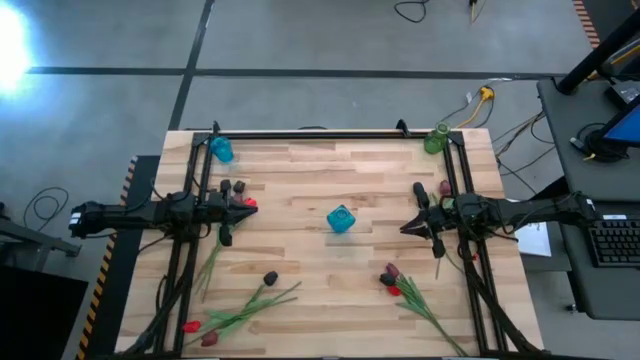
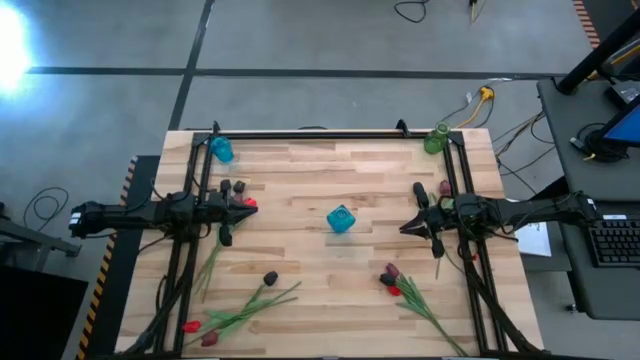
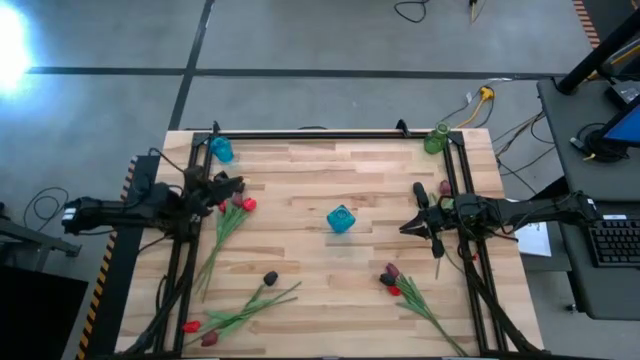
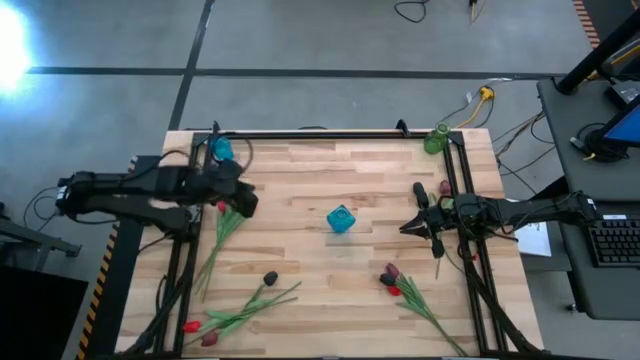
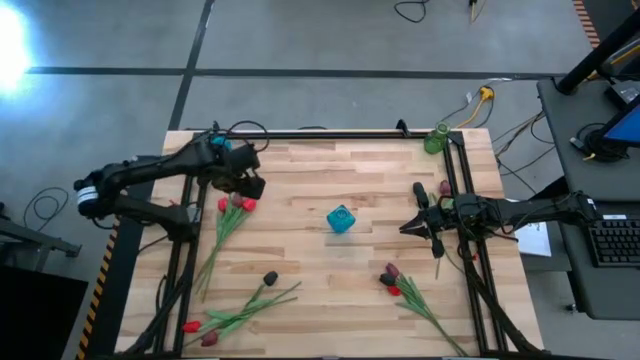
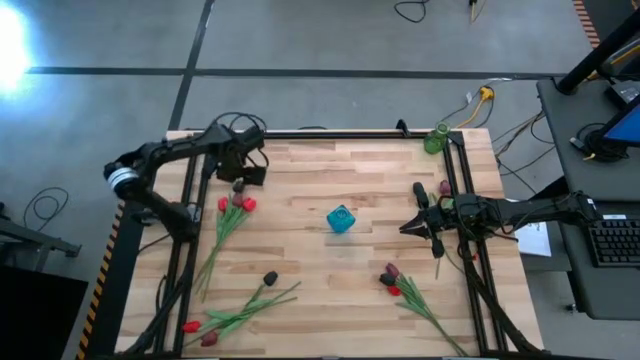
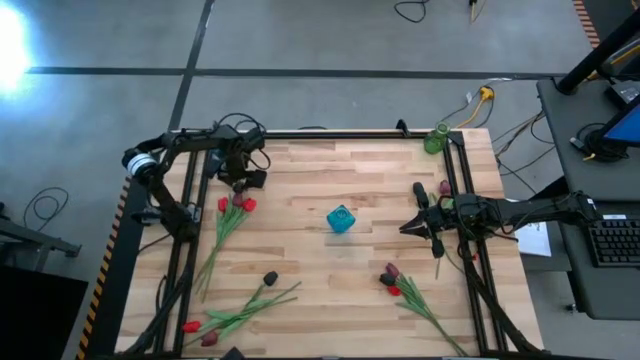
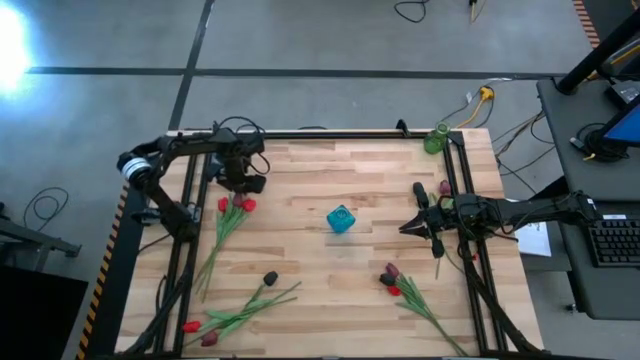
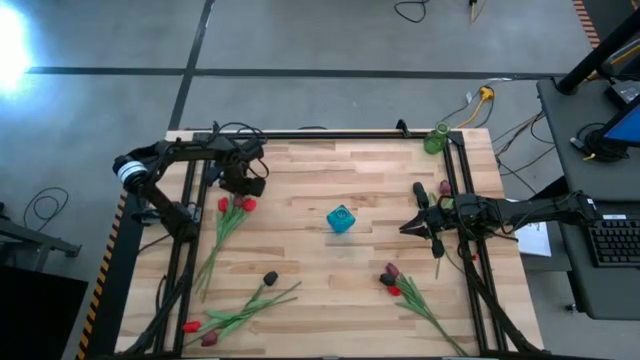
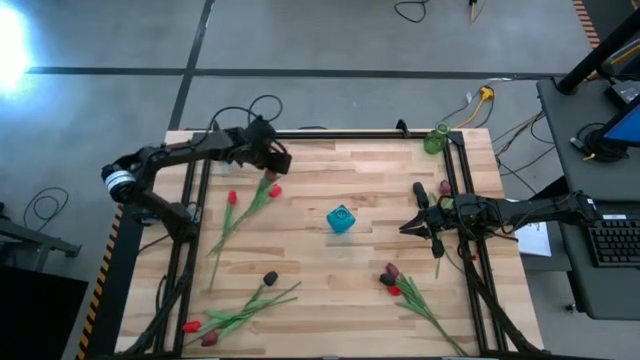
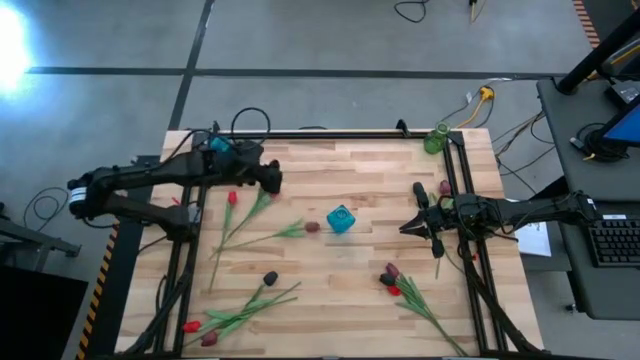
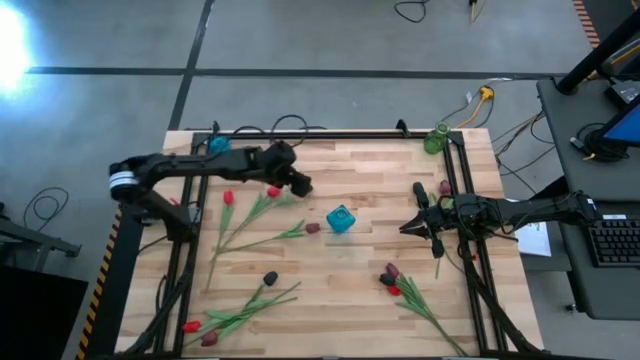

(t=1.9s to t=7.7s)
Task: Sort flowers into vase by color
Put the black flower into the right blue vase

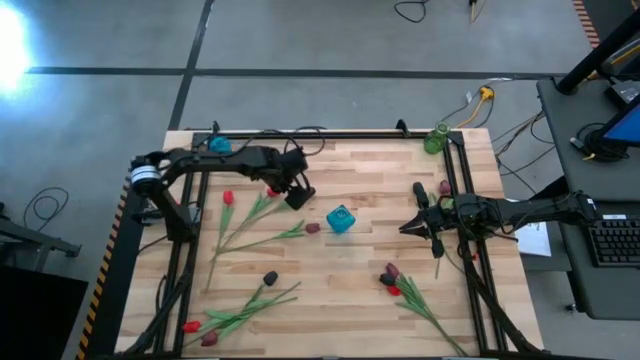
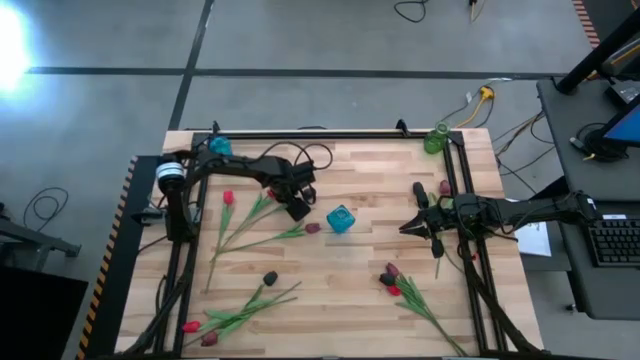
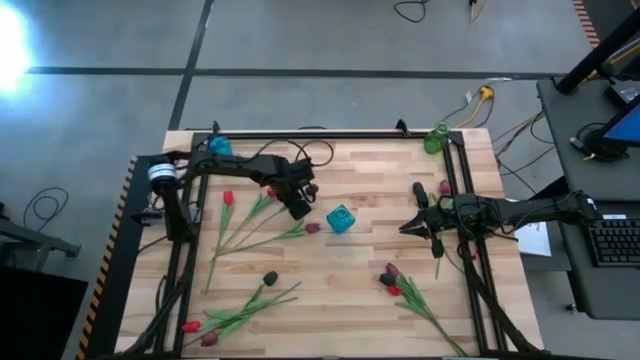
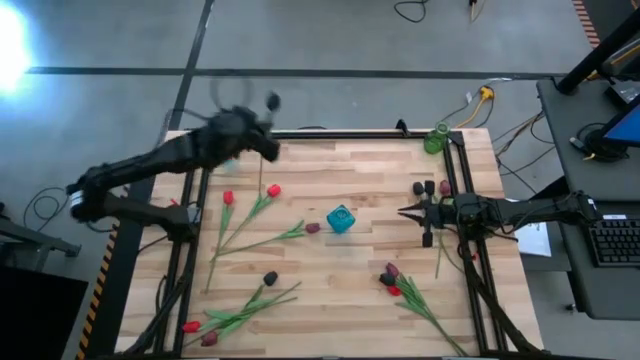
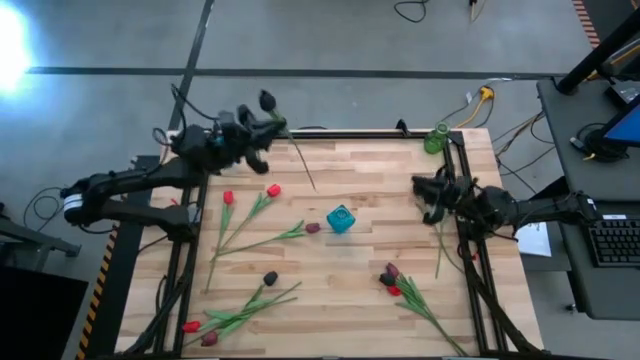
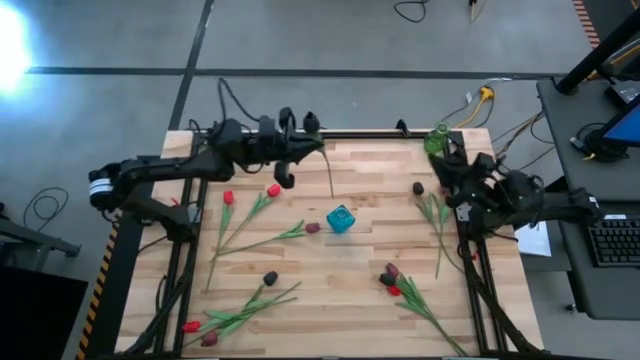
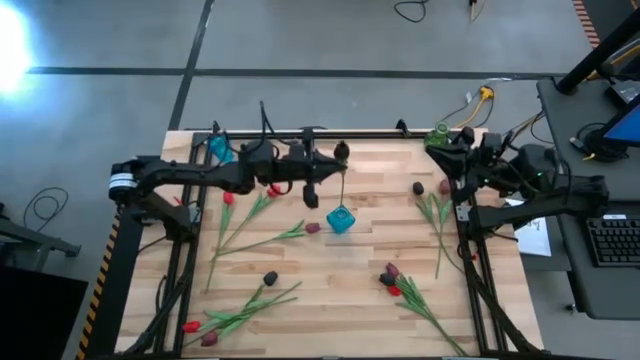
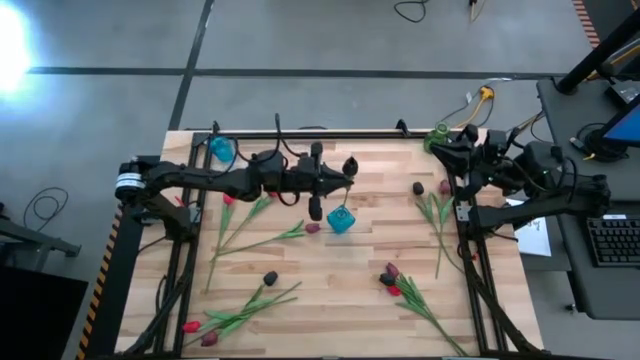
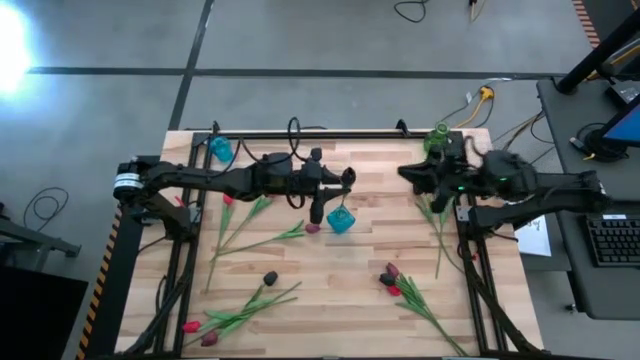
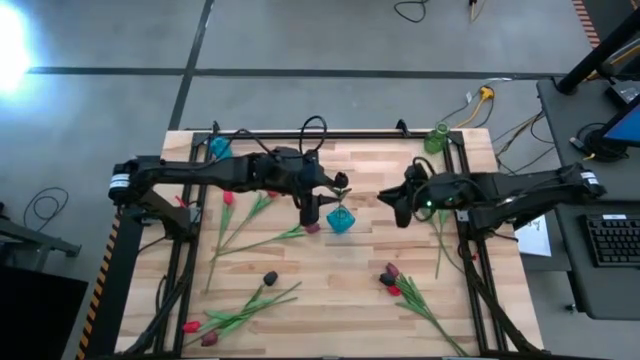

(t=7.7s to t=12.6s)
Put the black flower into the right blue vase

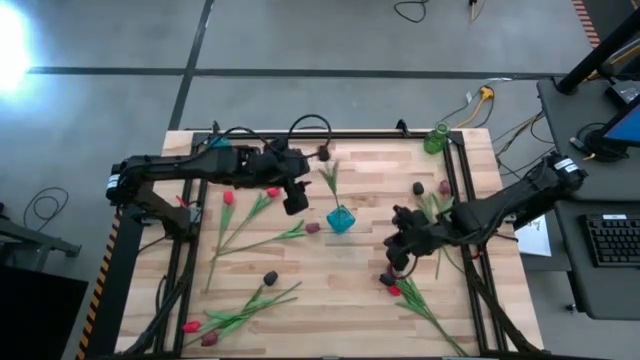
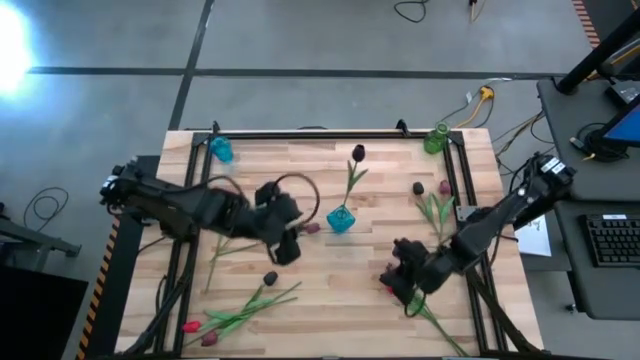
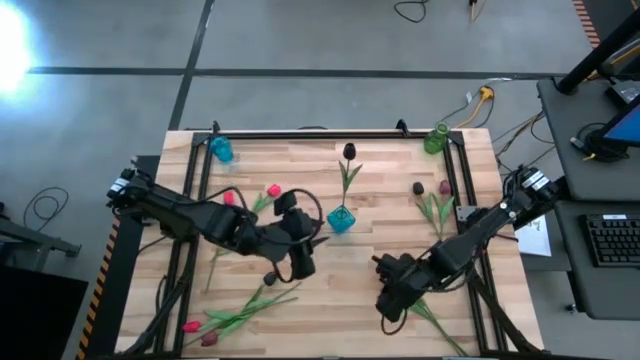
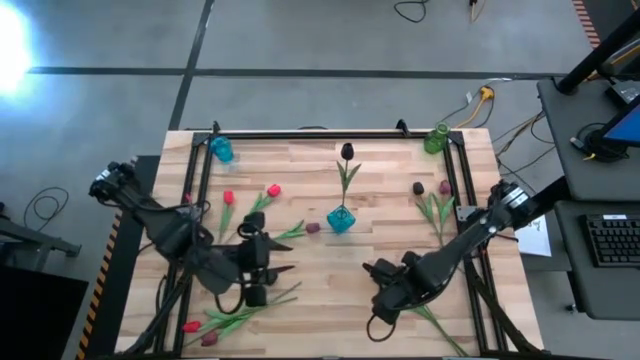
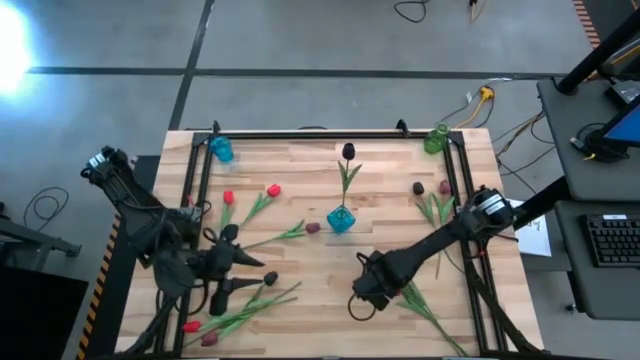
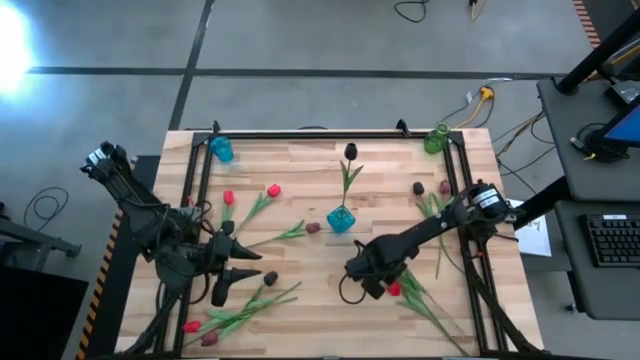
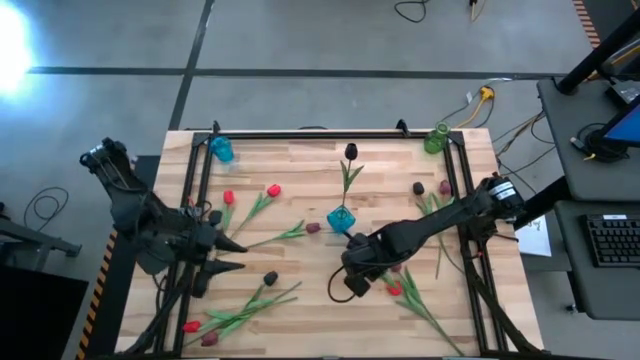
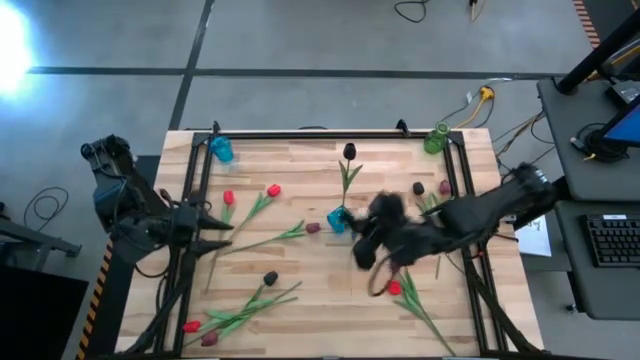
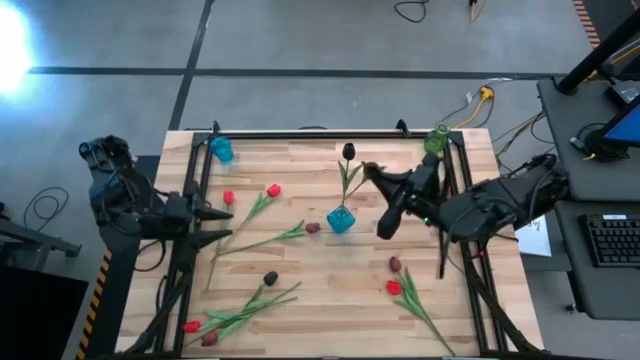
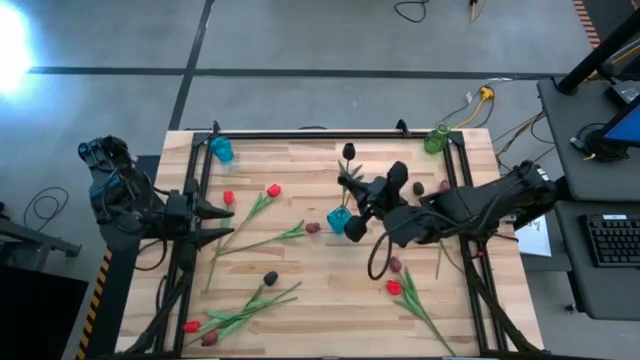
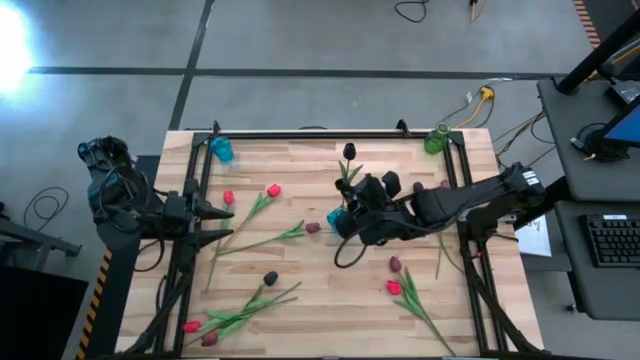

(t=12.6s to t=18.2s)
Put the black flower into the right blue vase

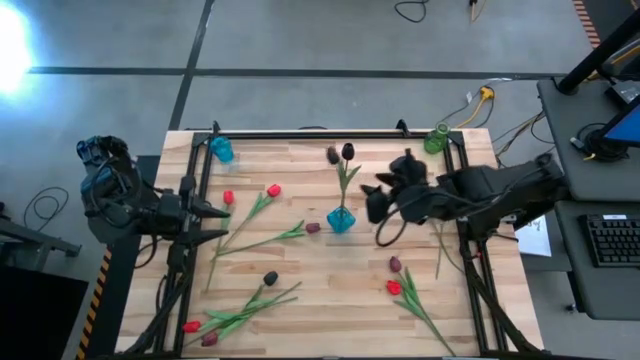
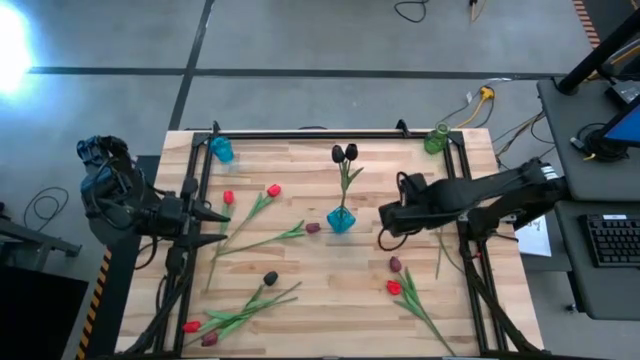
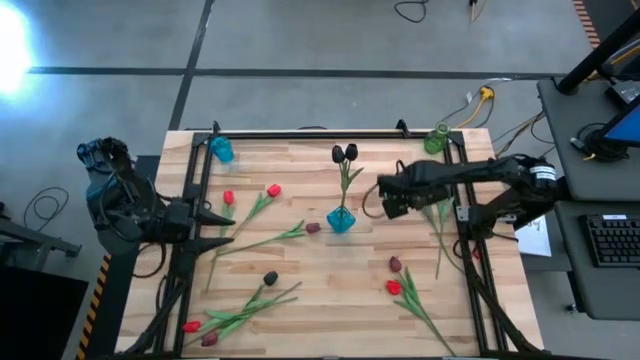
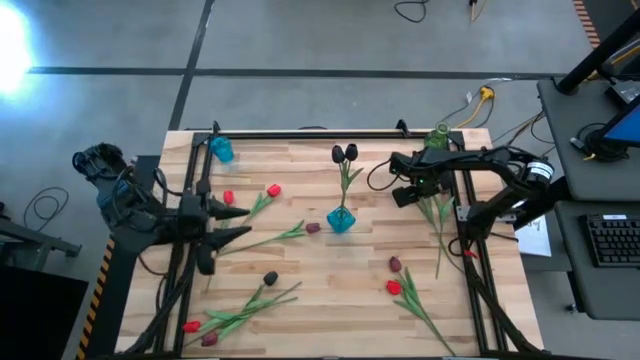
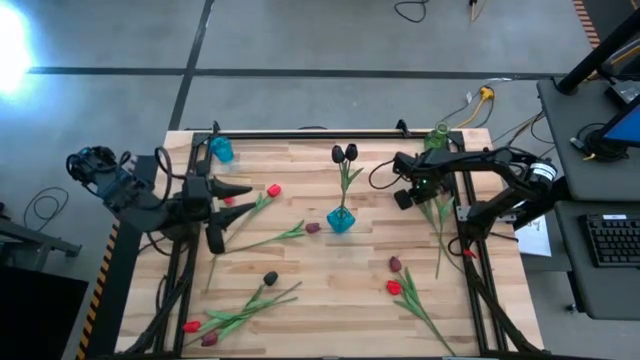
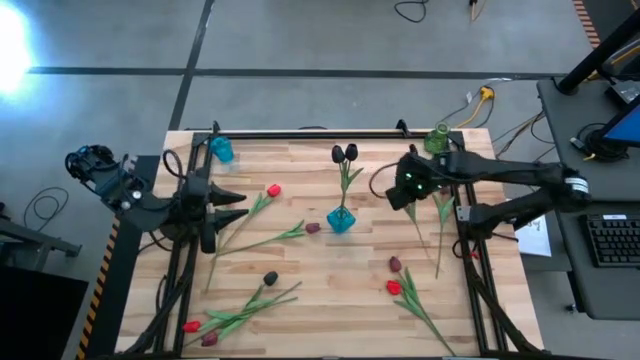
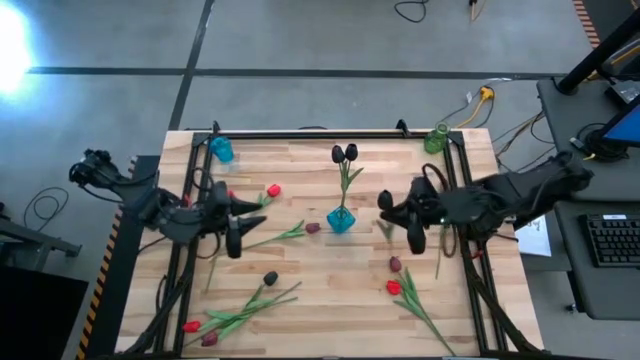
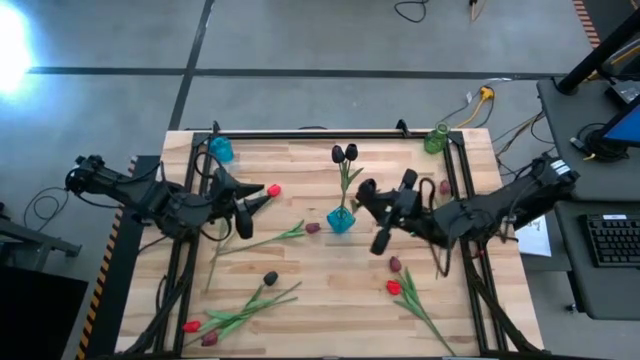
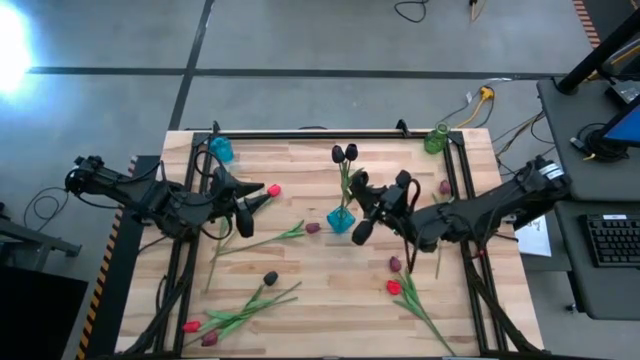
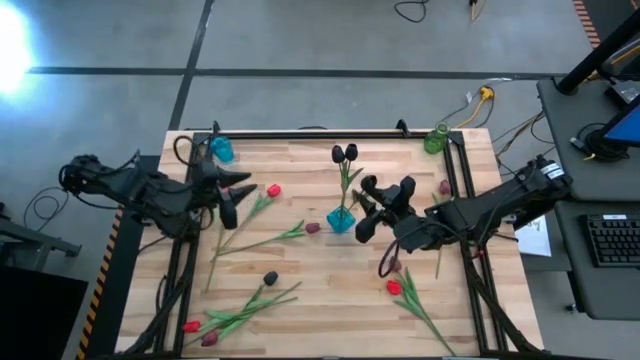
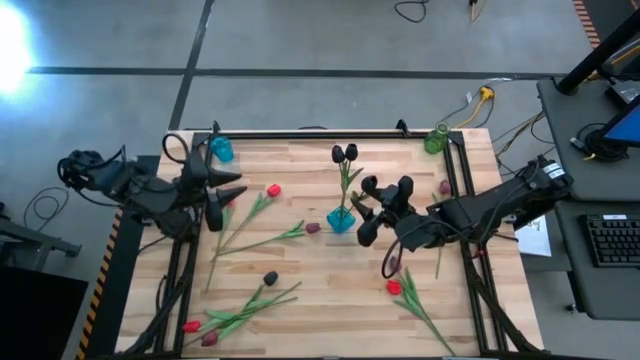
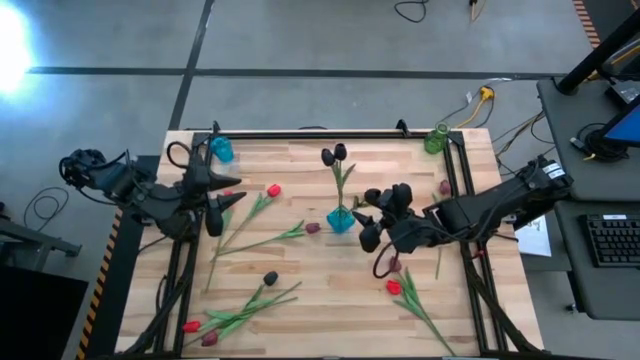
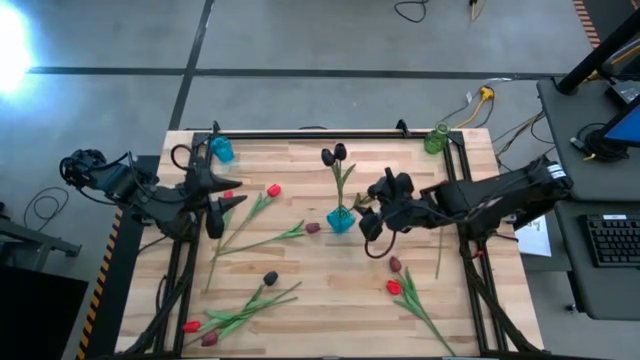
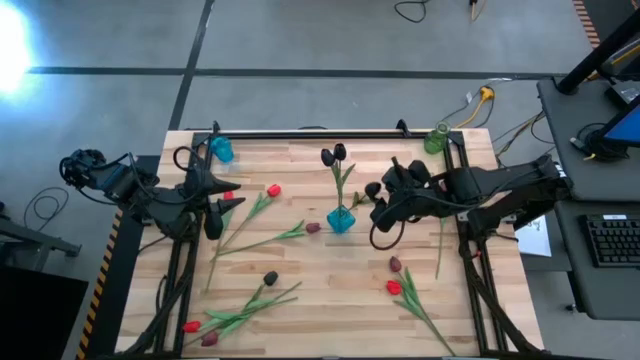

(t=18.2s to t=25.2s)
Put the black flower into the right blue vase
